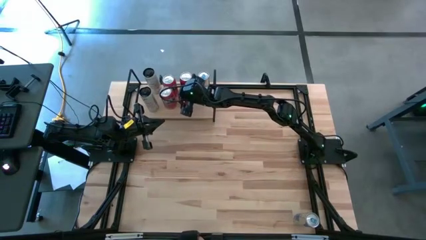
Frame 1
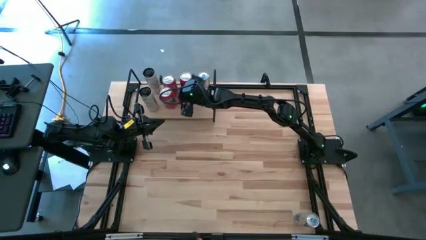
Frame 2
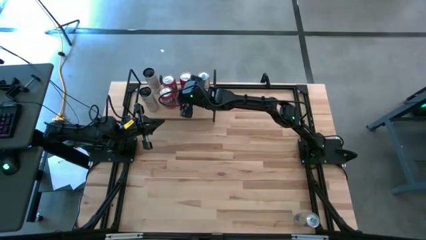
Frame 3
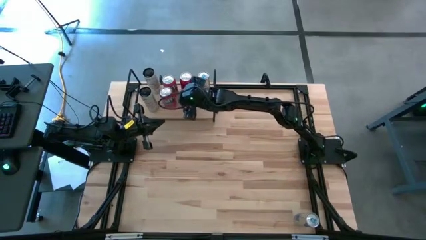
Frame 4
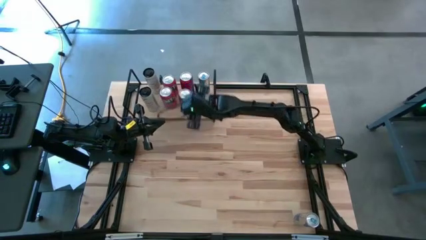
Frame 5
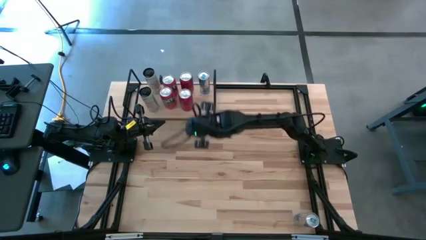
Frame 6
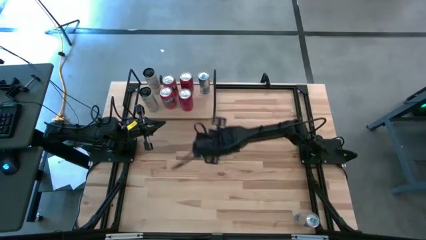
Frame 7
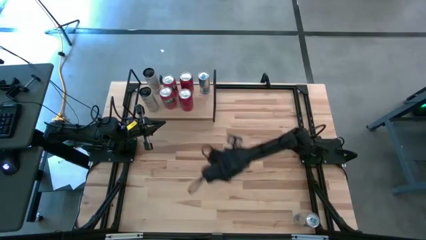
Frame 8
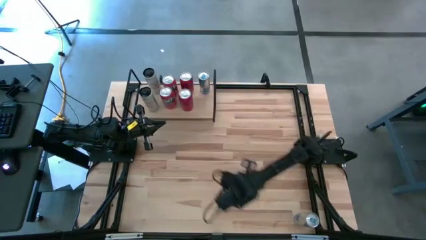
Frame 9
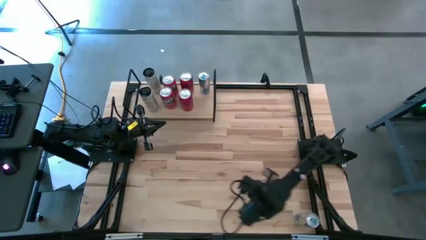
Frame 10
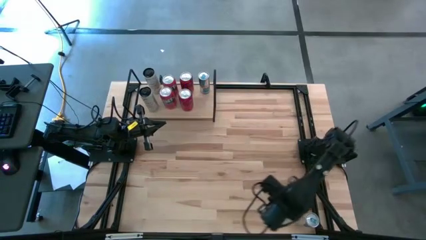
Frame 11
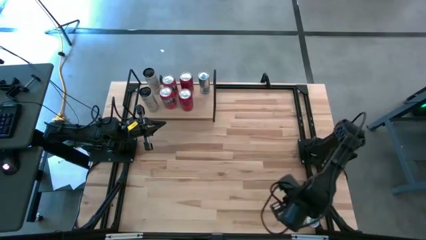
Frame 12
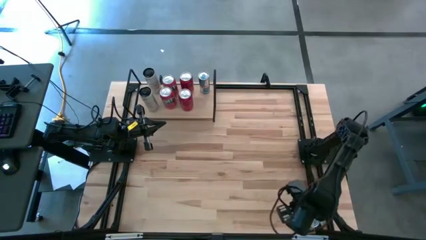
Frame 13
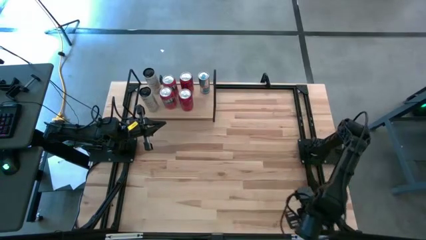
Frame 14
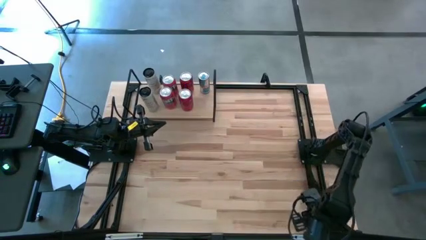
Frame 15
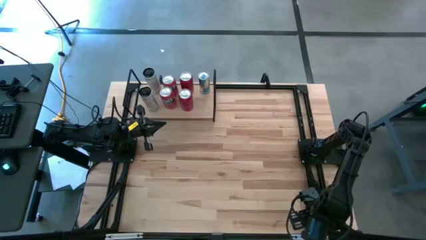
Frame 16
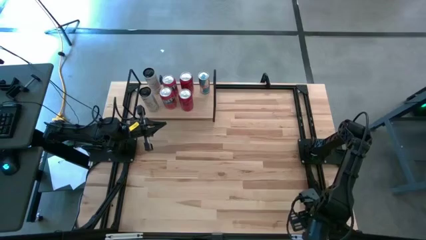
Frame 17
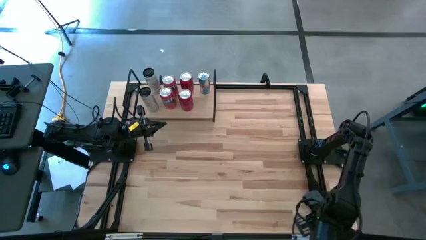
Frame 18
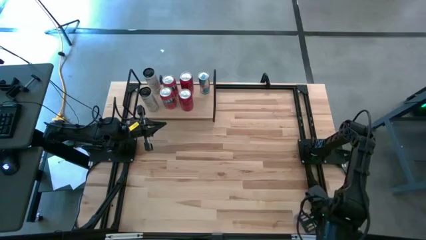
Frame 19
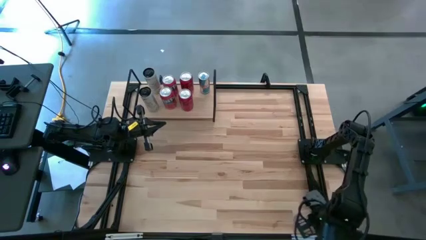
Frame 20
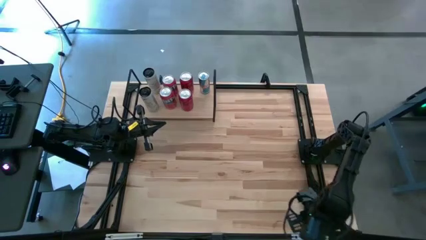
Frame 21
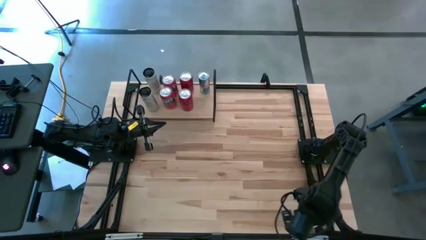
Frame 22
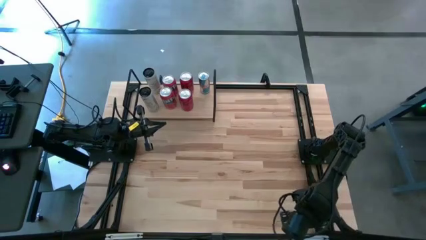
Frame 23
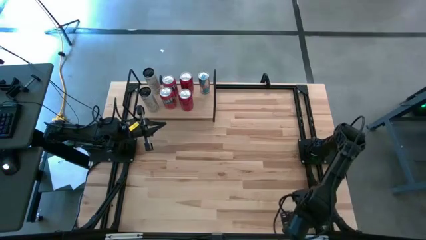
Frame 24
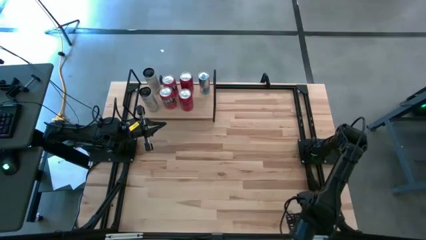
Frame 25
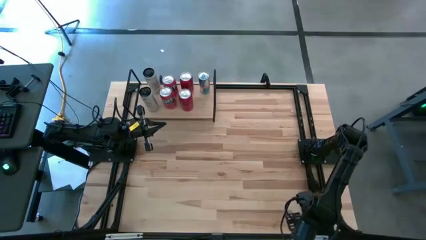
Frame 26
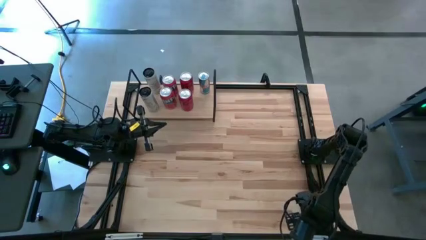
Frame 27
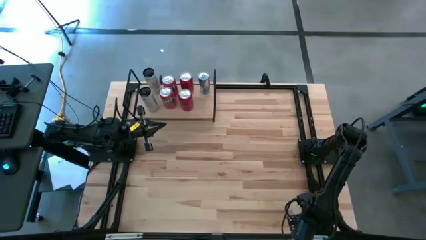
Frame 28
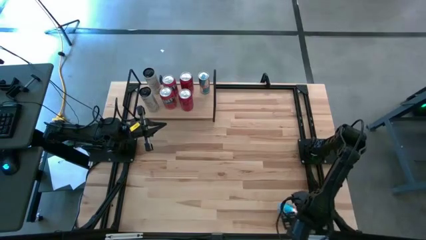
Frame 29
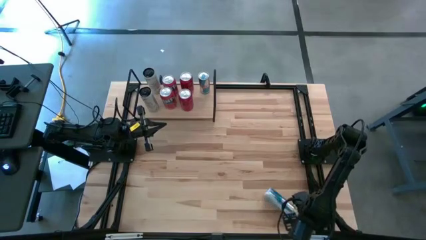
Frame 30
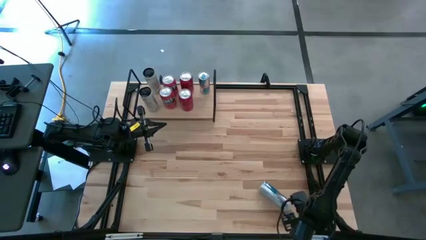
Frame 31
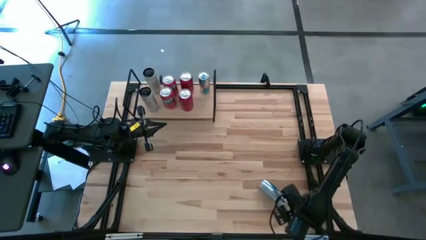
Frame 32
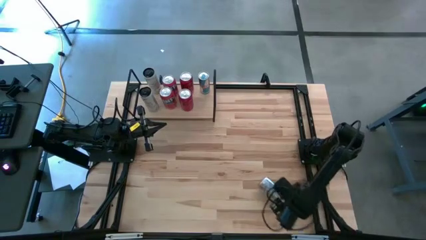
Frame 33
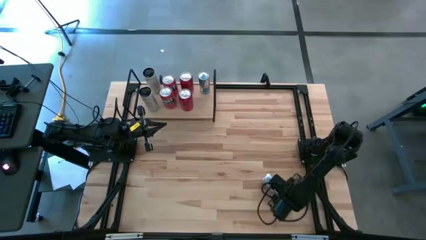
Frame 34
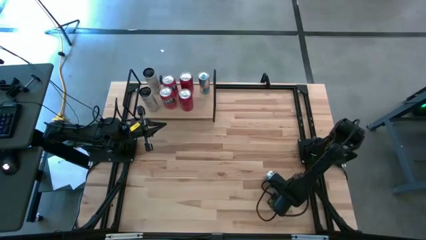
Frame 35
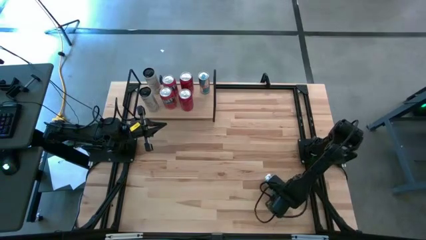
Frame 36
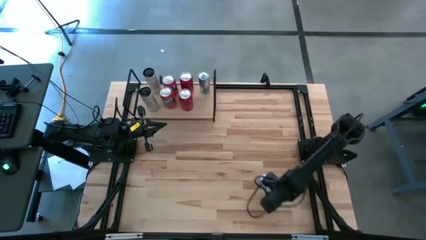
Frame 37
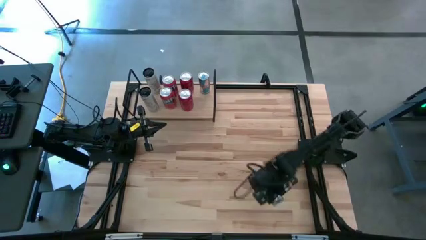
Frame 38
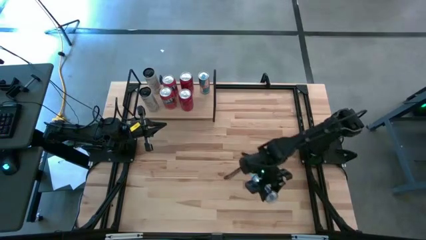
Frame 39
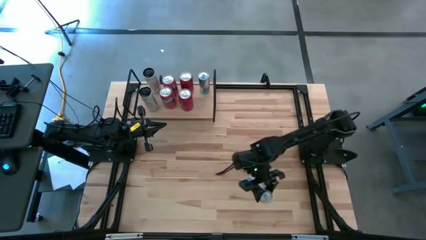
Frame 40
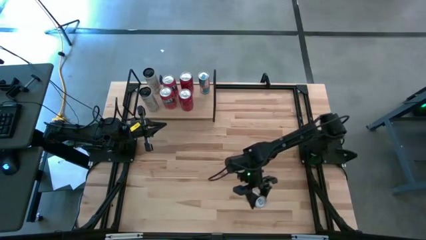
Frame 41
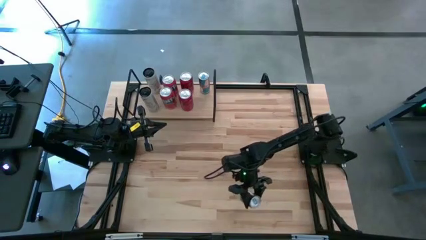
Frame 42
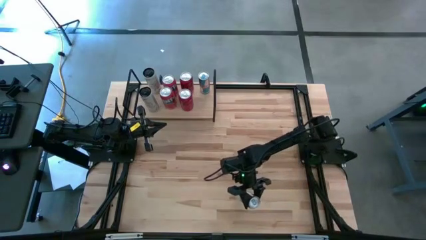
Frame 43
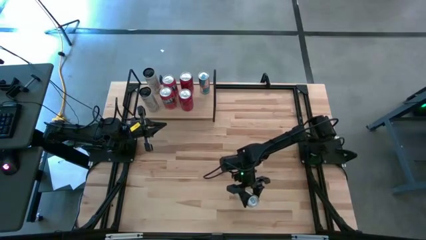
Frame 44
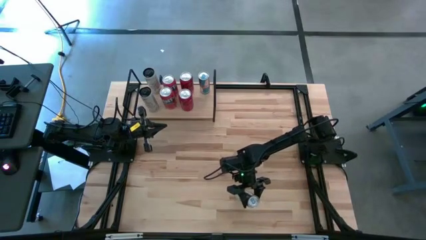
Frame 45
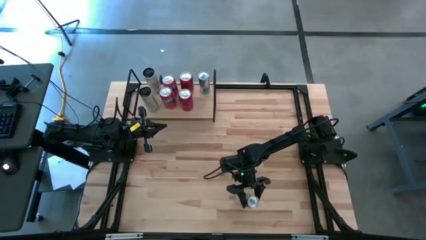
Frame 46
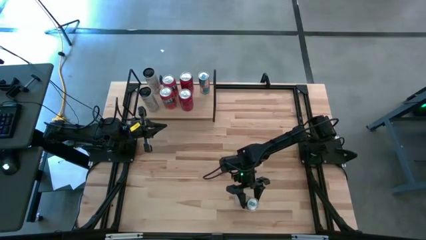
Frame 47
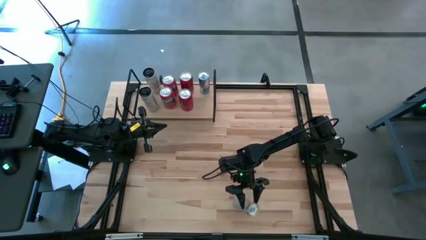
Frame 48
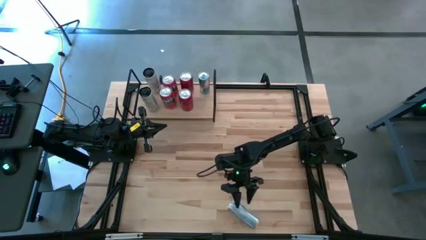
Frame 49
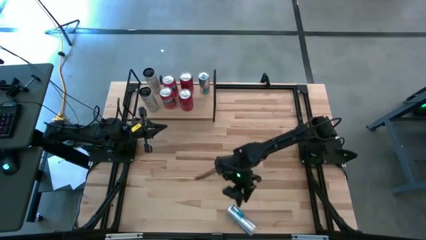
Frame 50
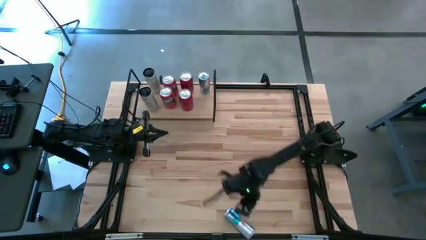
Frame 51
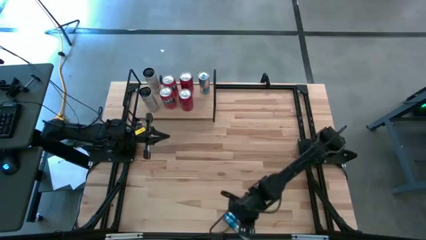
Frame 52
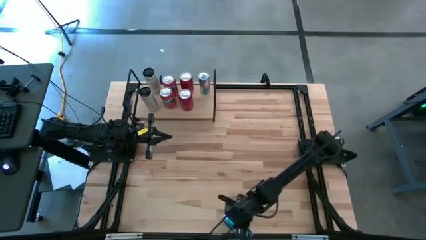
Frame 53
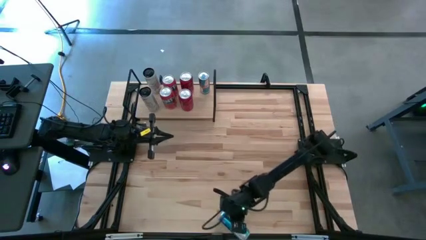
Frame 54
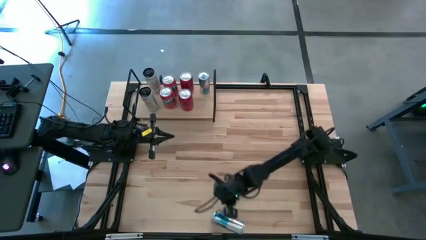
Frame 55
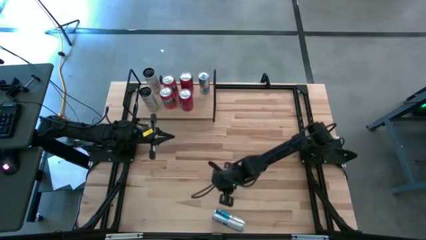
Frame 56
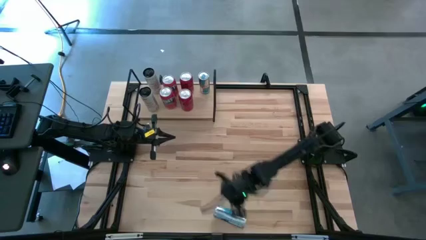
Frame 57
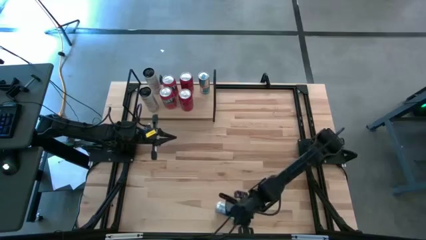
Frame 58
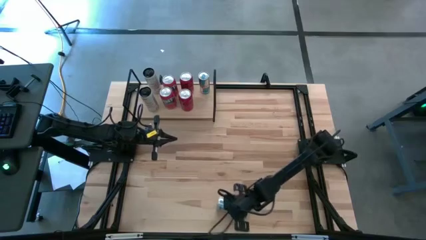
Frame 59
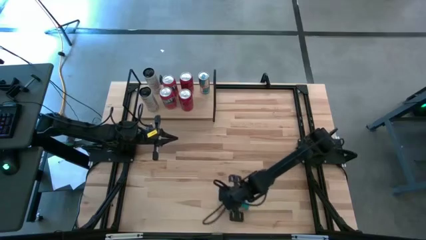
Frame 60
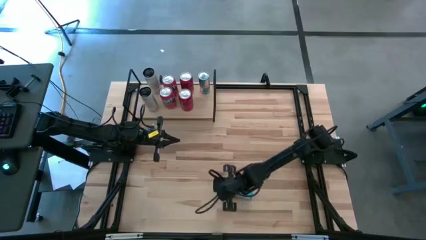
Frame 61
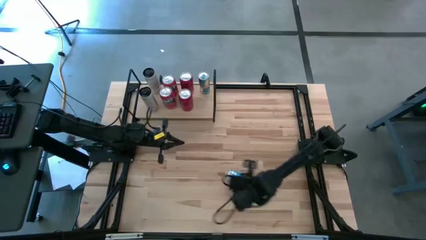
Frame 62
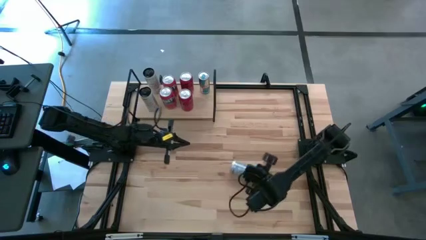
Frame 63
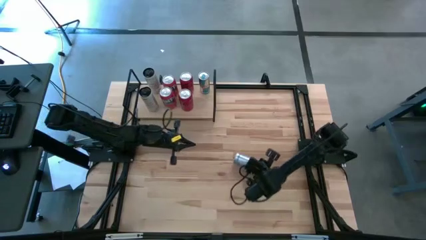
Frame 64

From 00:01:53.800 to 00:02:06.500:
Task: Place canned beverage on shelf
Put the blue soda can aligned with the other blue soda can on the shelf
